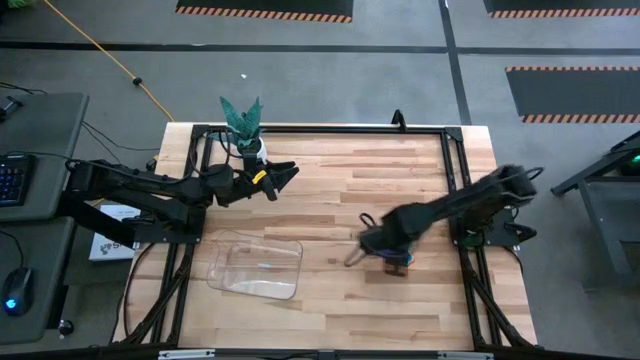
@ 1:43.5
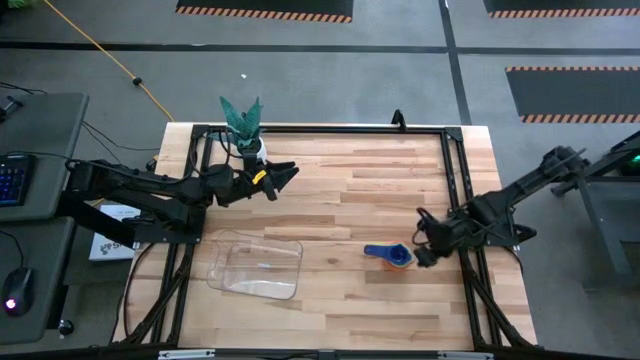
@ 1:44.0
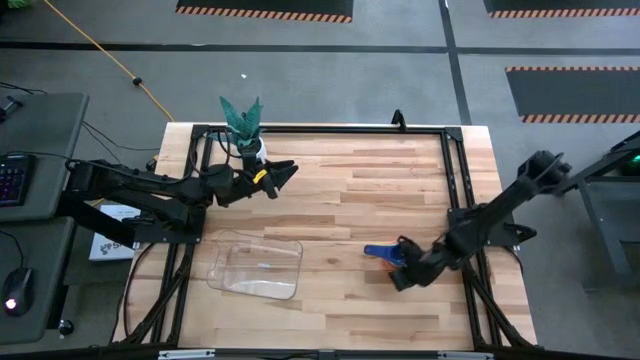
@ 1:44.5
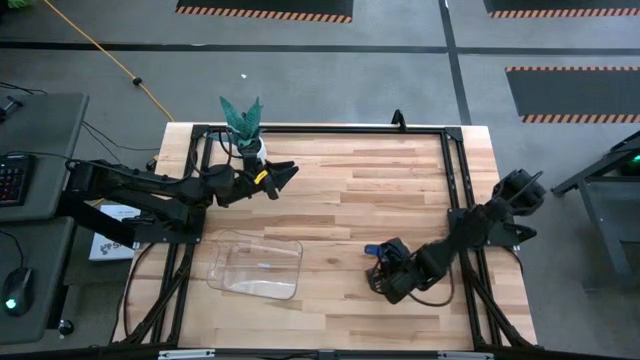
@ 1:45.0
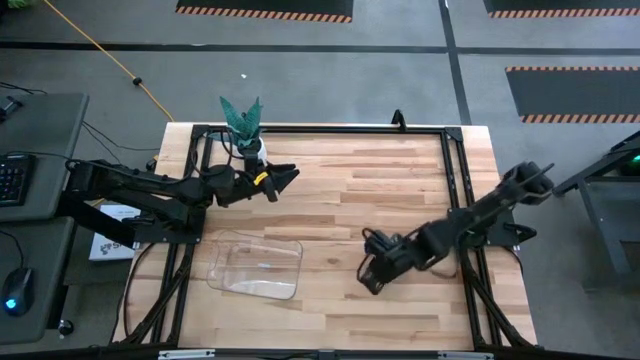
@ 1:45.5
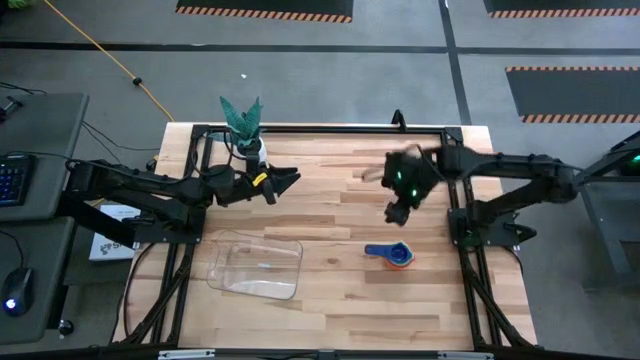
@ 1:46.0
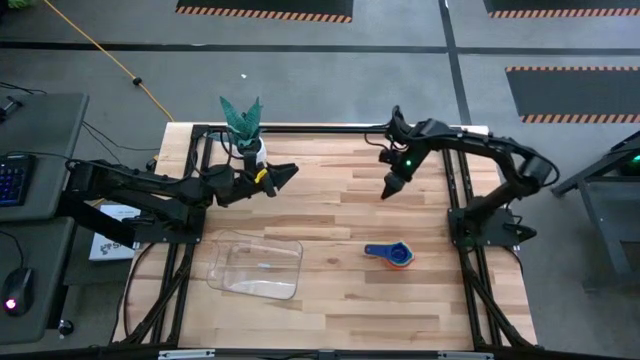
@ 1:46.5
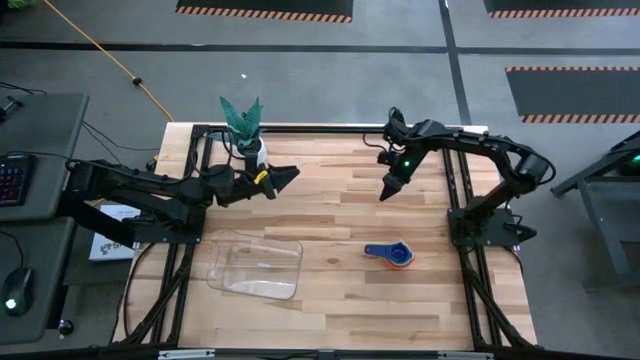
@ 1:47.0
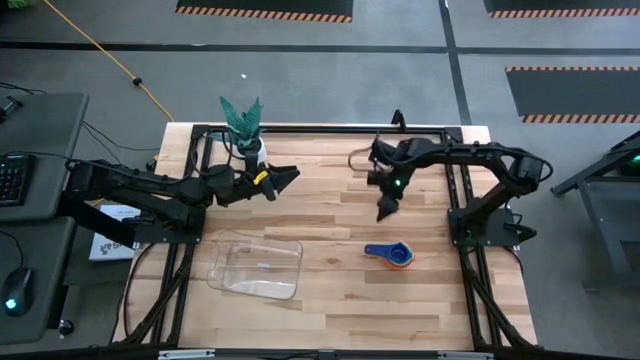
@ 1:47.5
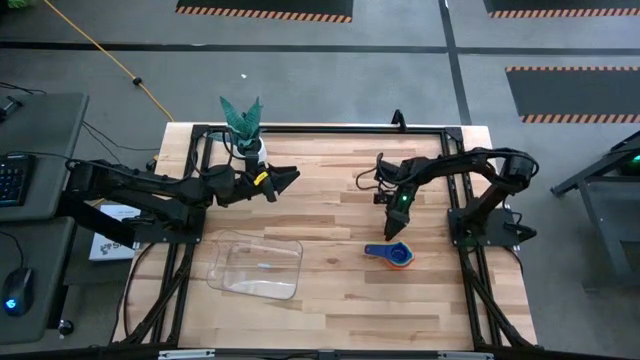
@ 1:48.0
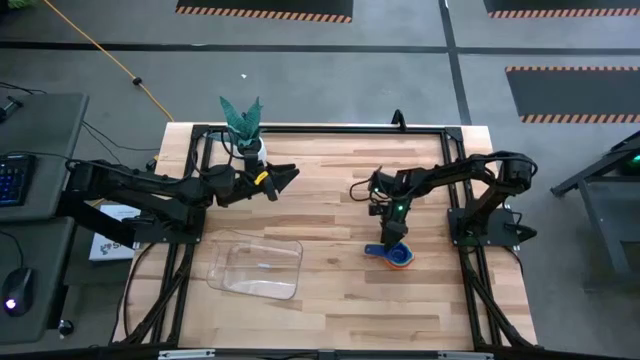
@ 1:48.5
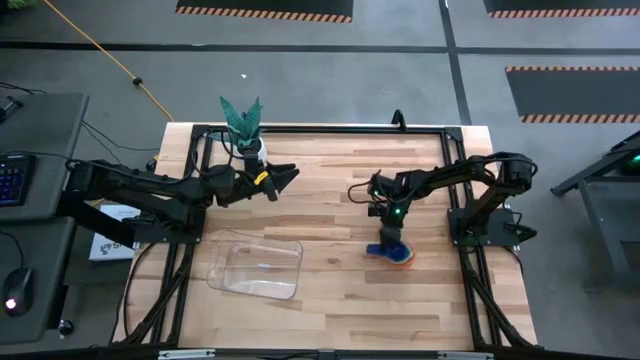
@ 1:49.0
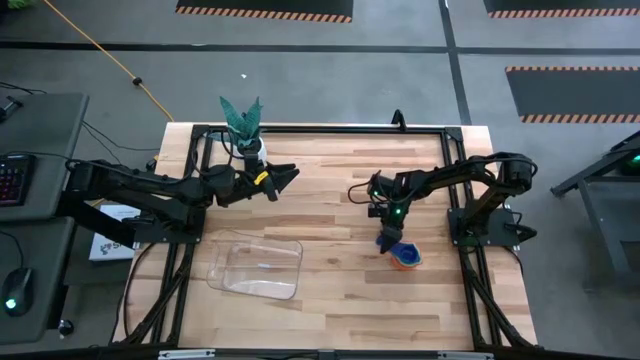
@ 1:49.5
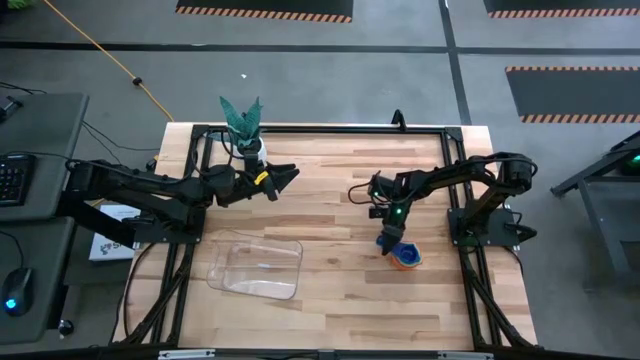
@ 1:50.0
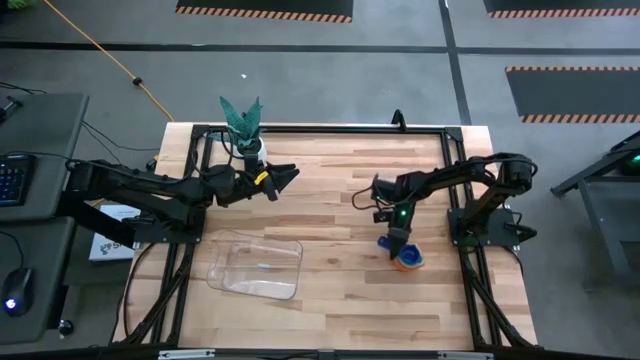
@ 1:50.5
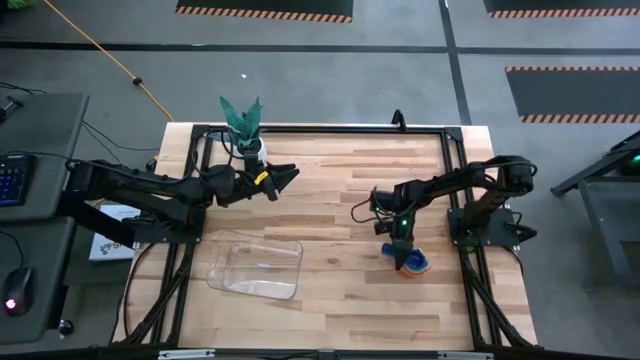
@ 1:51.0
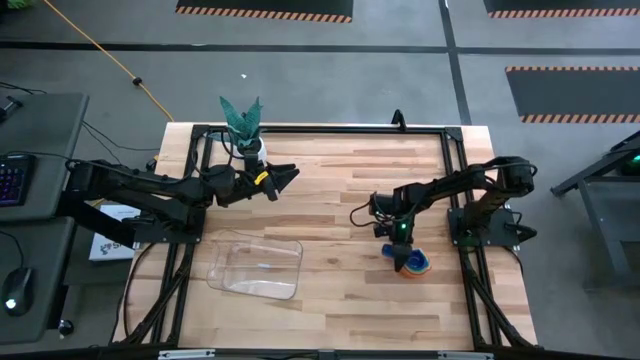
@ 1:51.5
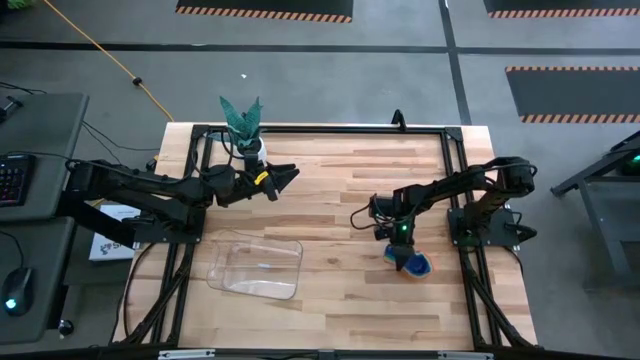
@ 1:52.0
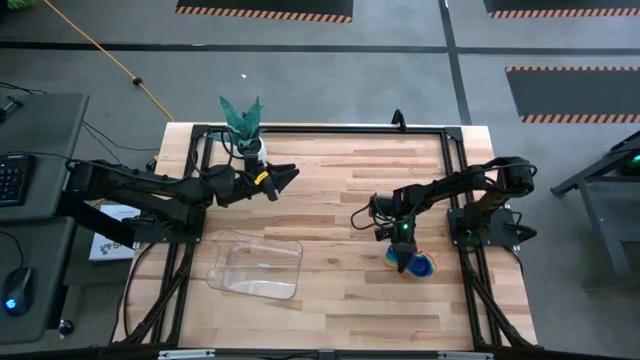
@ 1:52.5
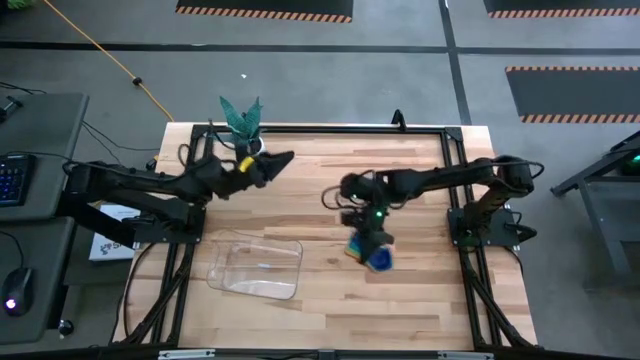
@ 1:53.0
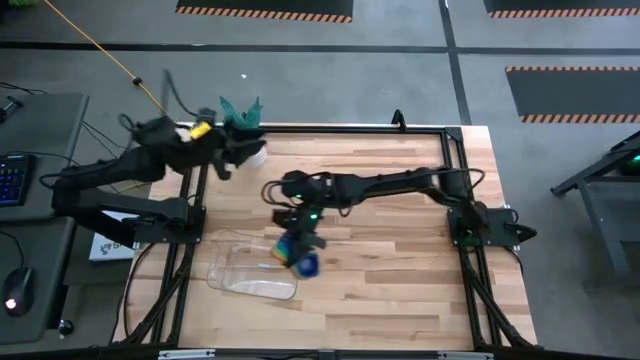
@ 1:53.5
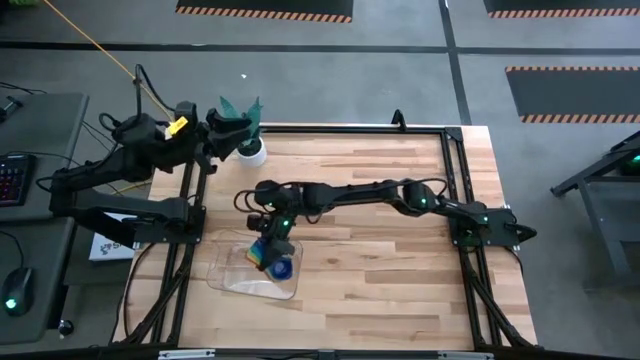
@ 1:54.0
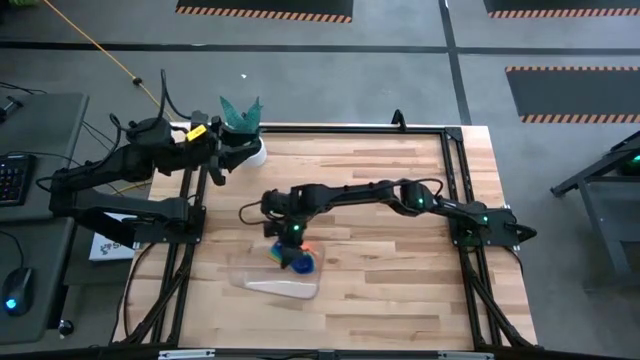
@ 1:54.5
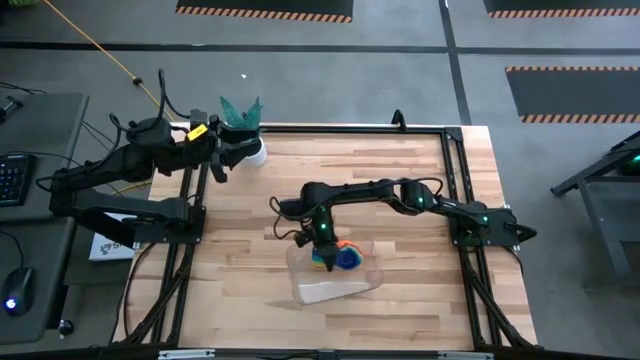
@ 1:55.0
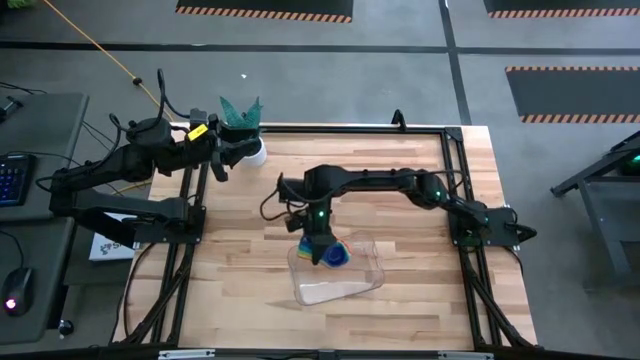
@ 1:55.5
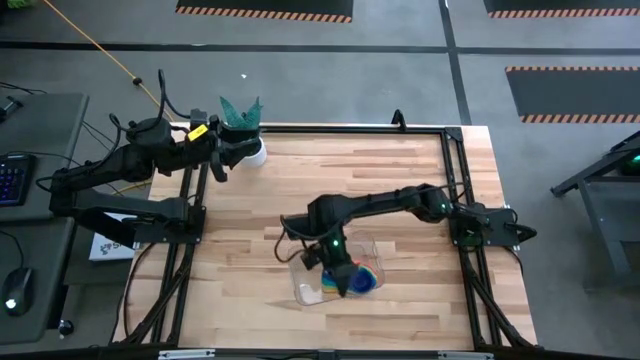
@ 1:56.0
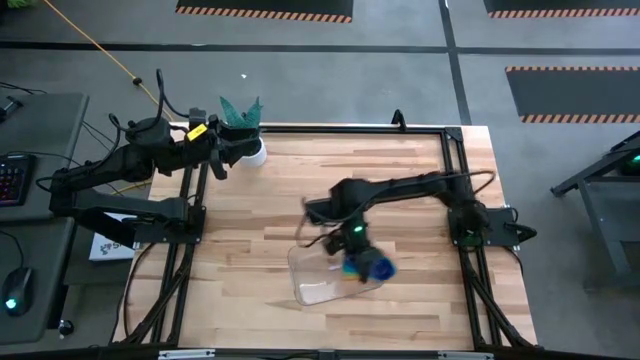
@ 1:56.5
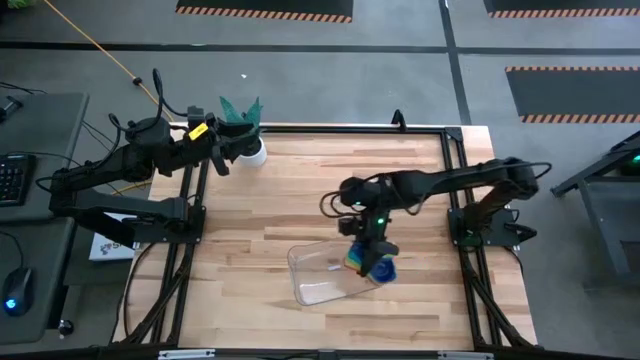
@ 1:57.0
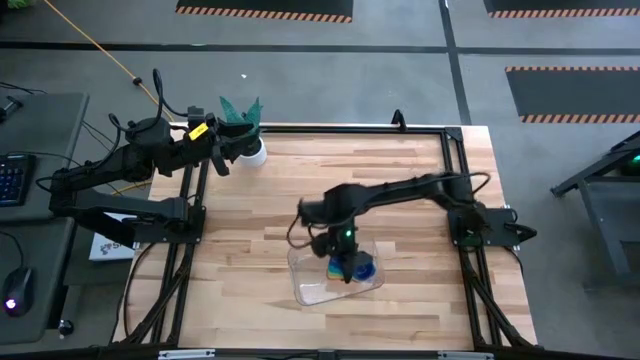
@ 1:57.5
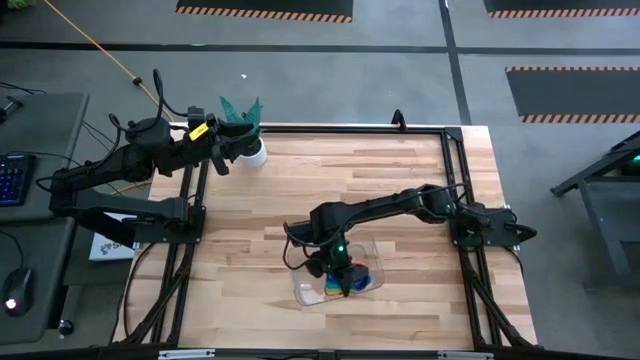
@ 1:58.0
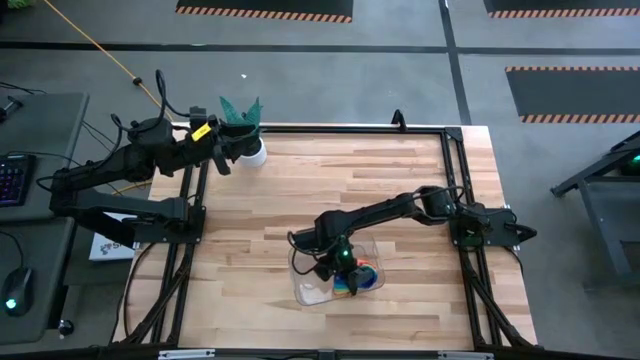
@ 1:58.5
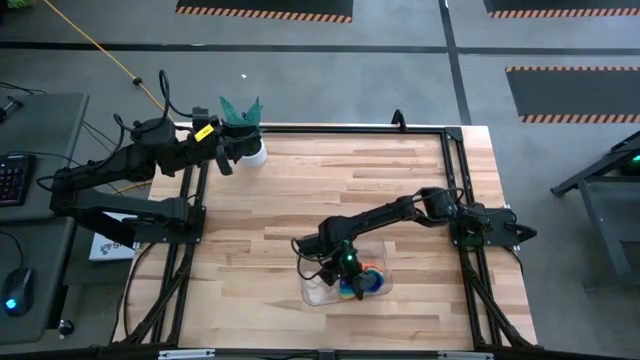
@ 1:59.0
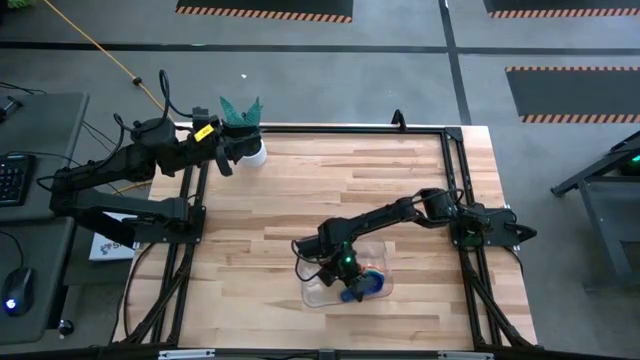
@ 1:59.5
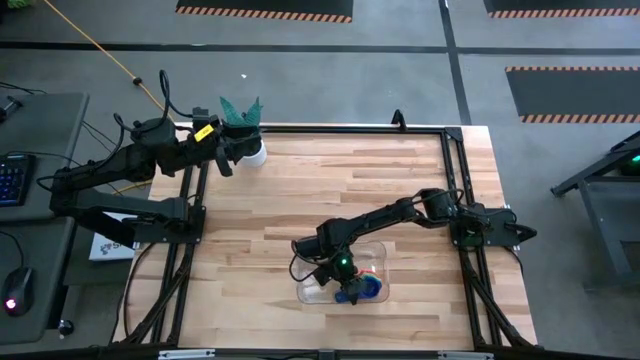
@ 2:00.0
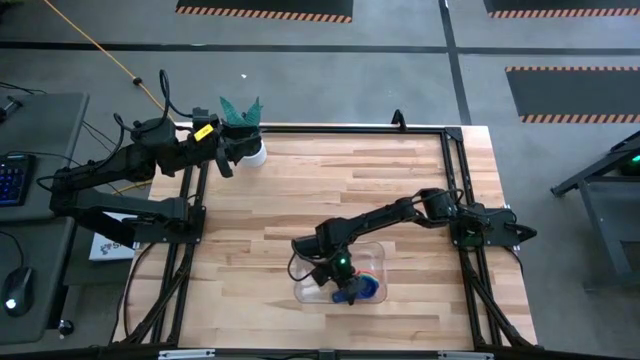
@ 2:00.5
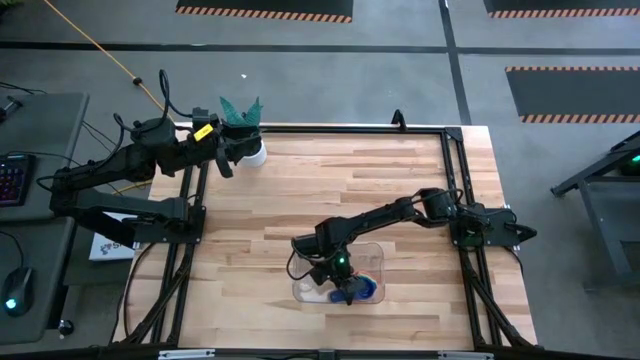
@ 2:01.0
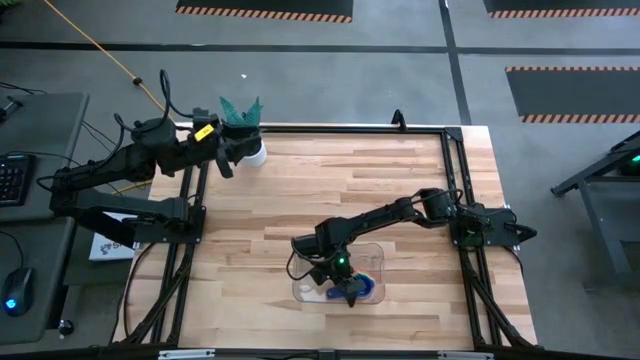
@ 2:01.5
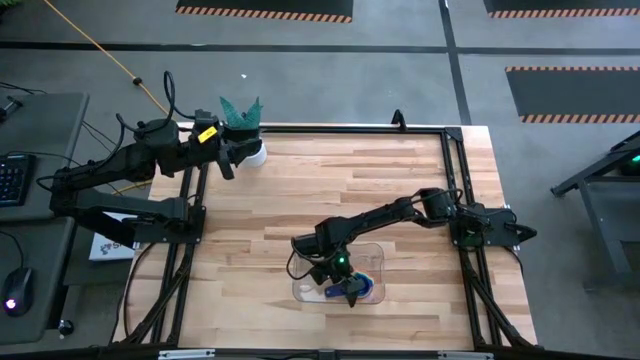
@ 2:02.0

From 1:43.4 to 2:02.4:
Task: Nest measuring cups in basket
Put the stacked measuring cups into the transparent bin

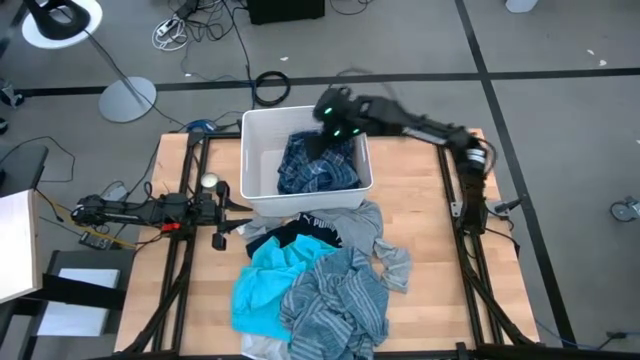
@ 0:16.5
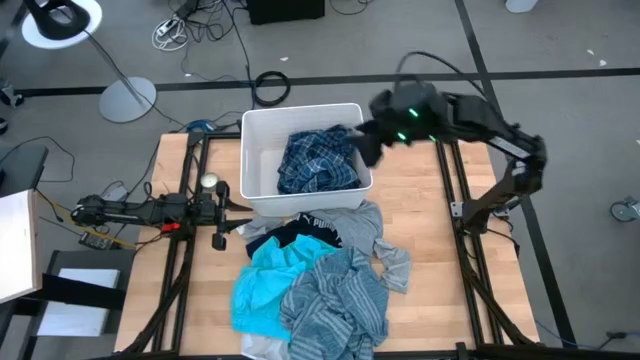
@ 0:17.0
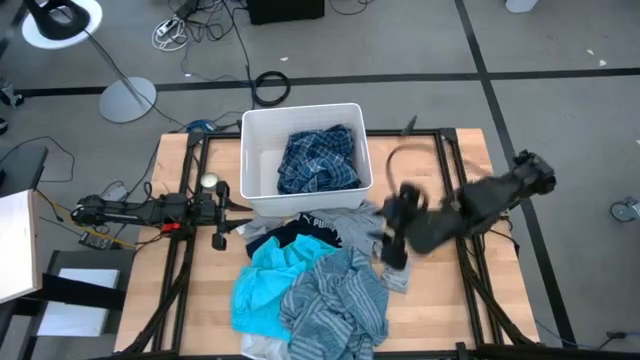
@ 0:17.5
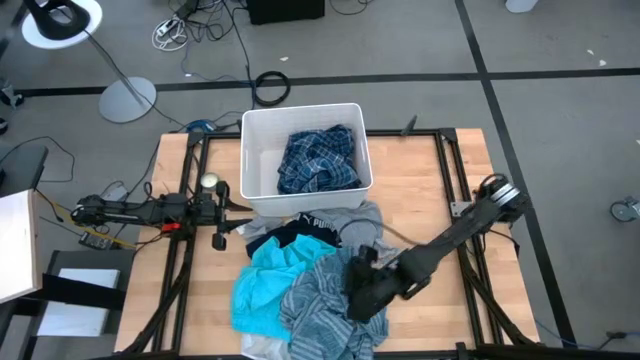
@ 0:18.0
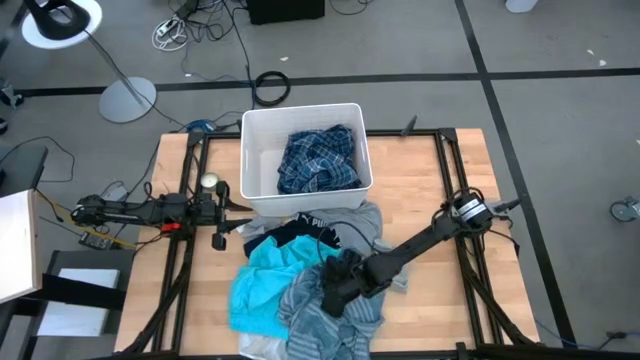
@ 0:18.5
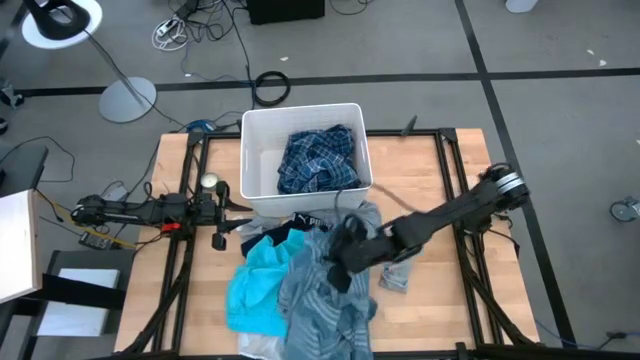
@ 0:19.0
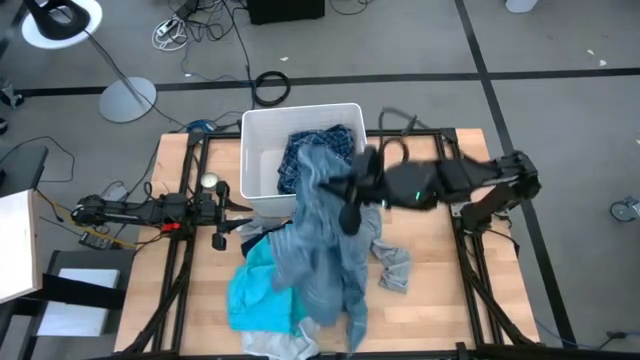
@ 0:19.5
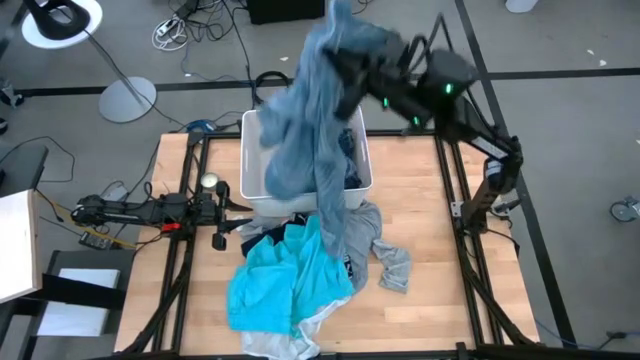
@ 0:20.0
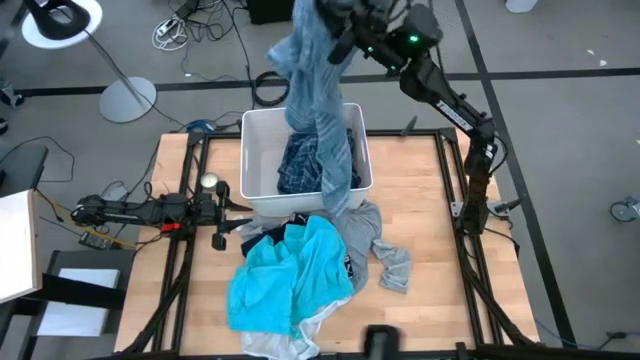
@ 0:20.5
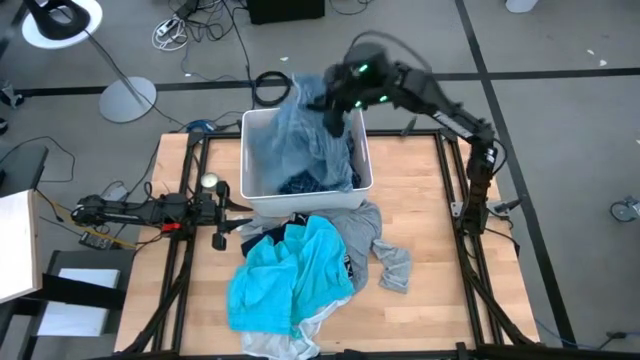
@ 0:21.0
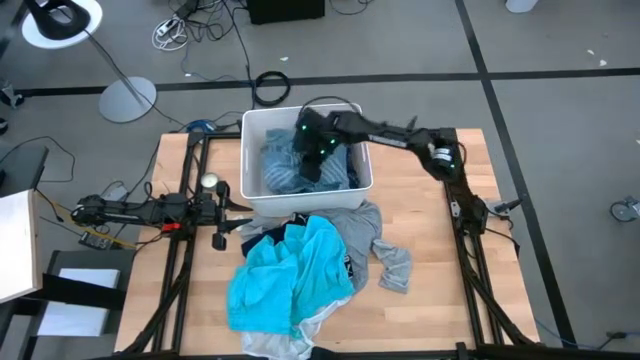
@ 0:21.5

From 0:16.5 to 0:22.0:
Task: Sort clothes
Put the blue patterned cloth into the white bin
